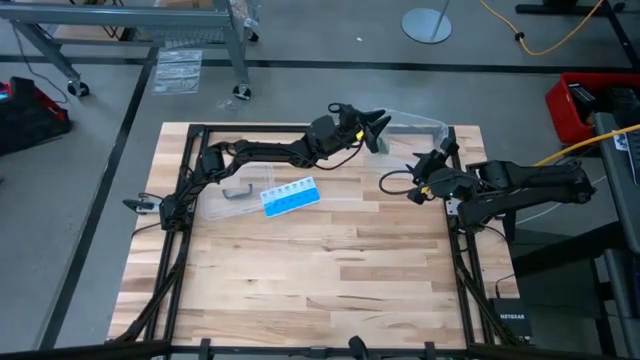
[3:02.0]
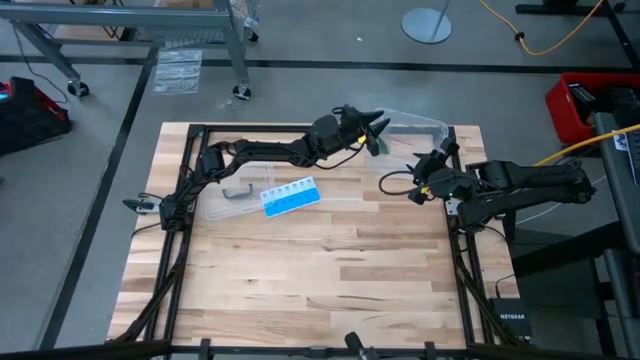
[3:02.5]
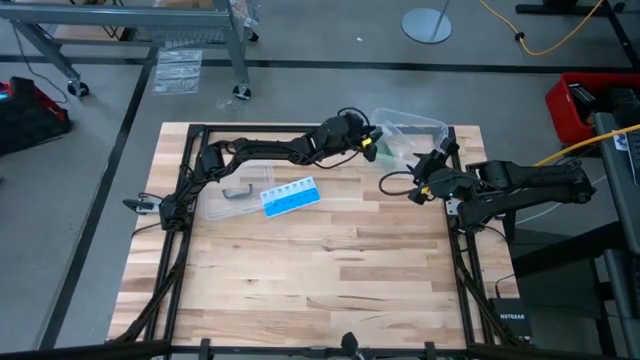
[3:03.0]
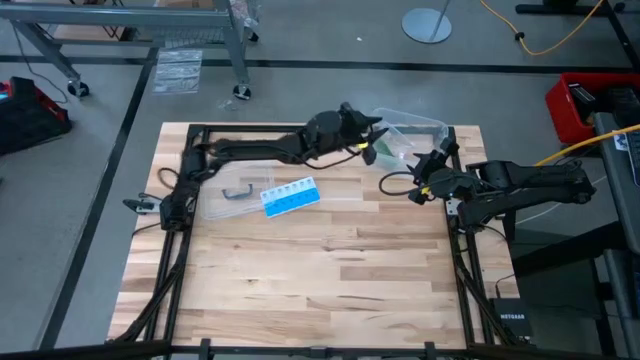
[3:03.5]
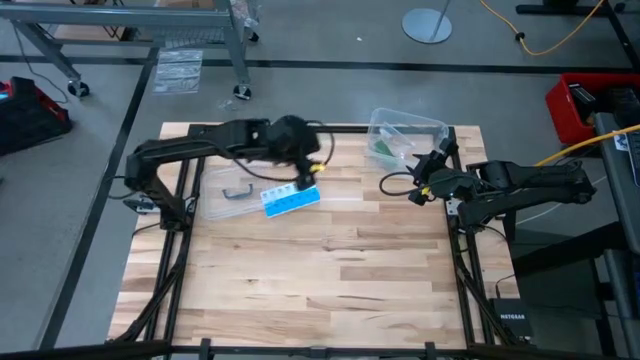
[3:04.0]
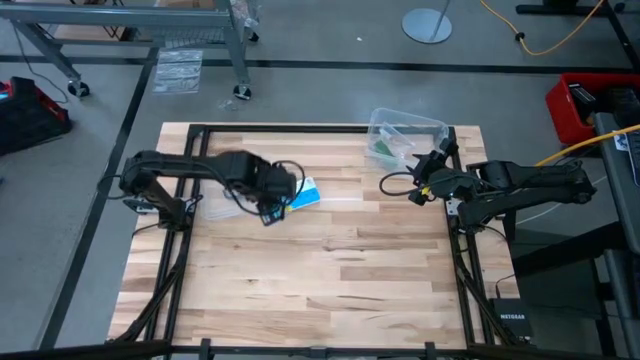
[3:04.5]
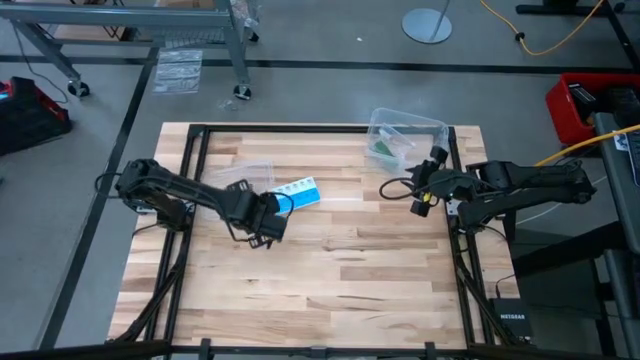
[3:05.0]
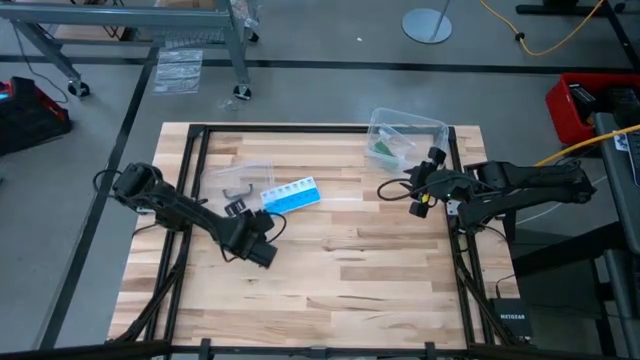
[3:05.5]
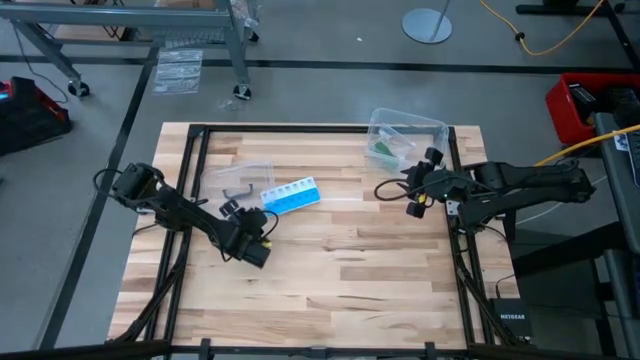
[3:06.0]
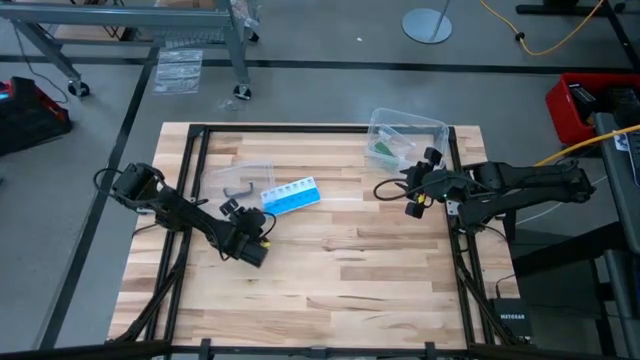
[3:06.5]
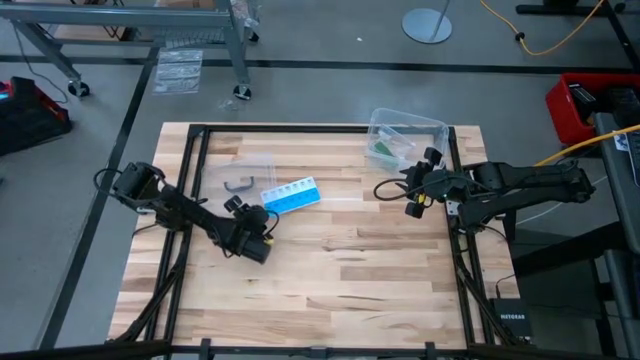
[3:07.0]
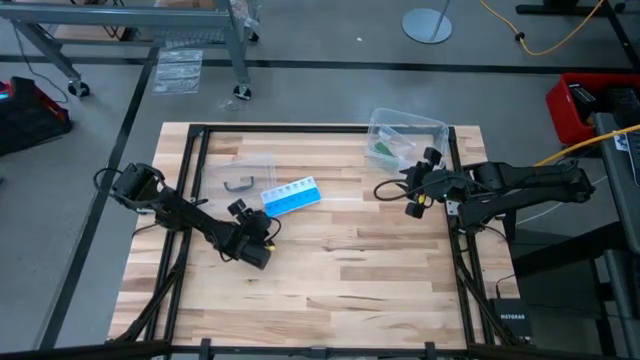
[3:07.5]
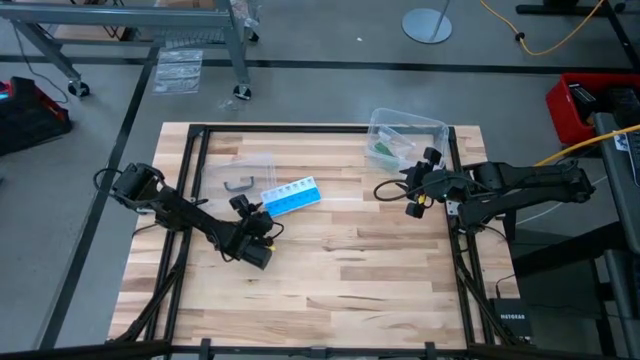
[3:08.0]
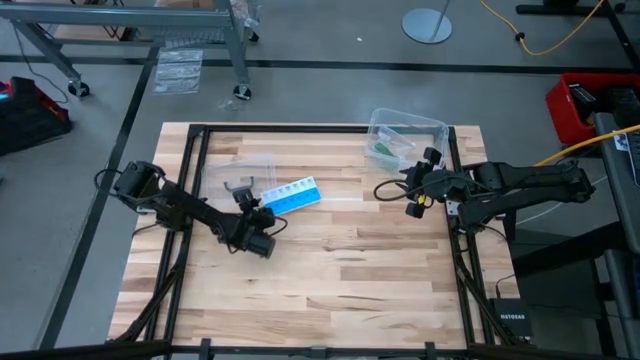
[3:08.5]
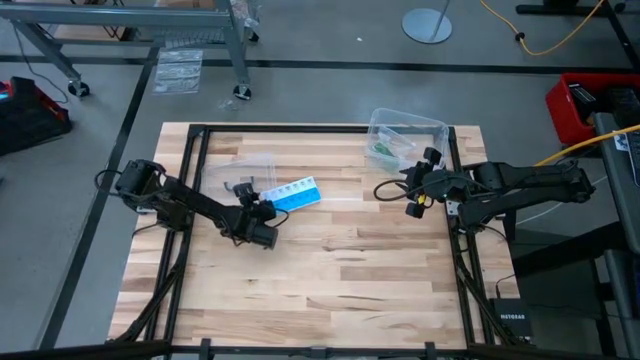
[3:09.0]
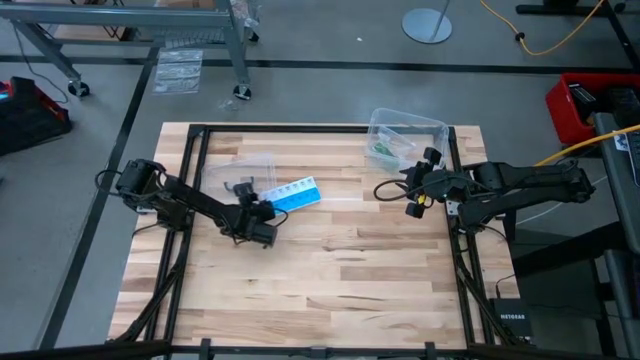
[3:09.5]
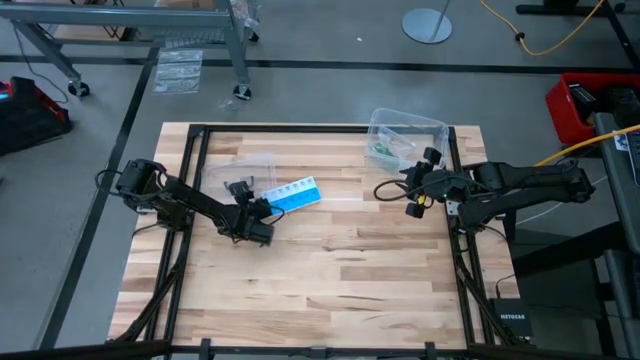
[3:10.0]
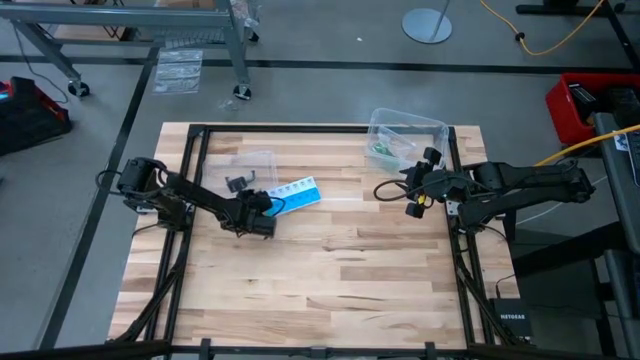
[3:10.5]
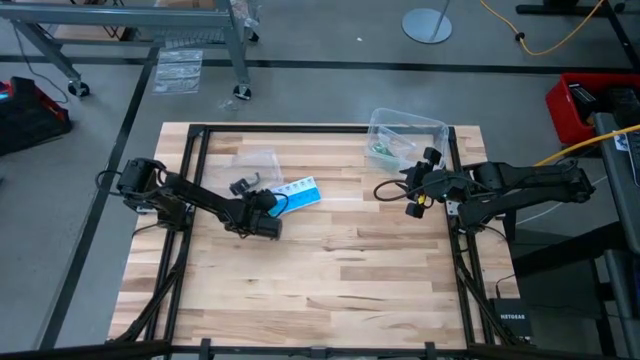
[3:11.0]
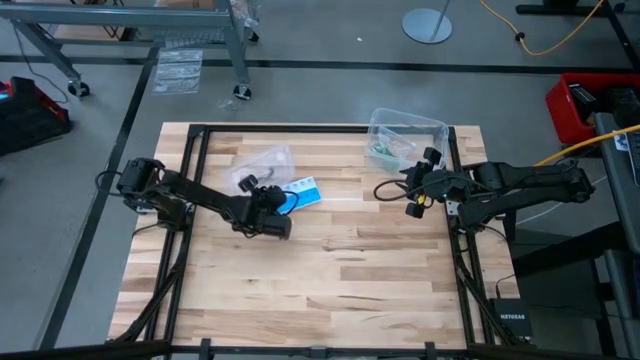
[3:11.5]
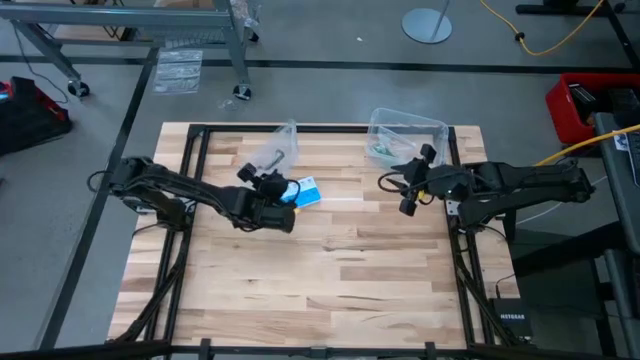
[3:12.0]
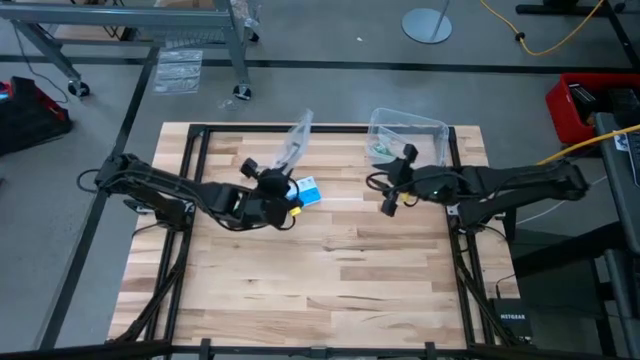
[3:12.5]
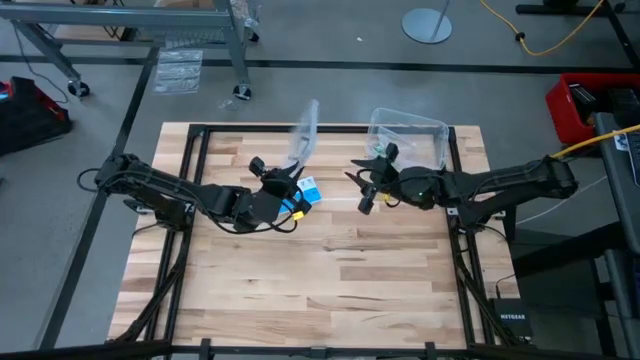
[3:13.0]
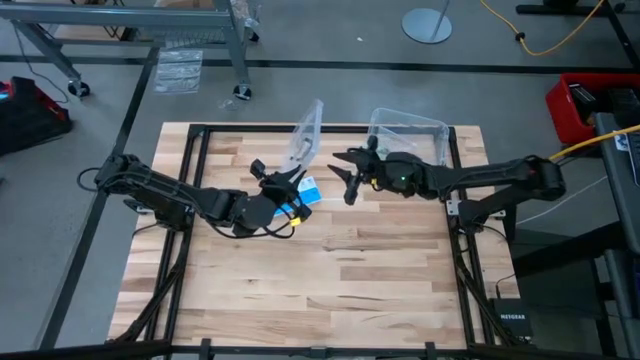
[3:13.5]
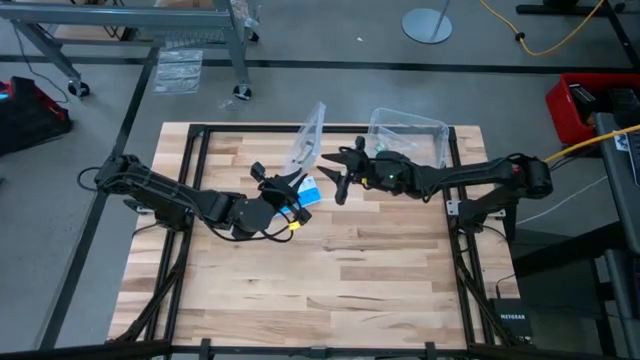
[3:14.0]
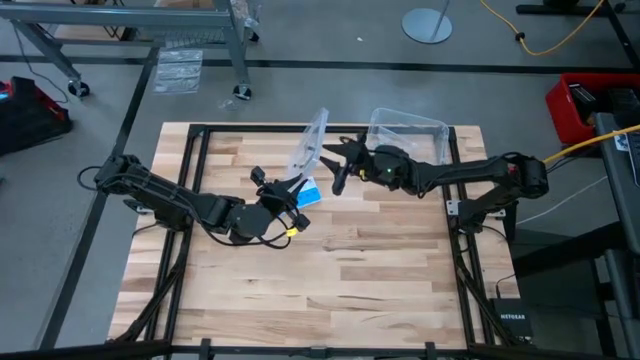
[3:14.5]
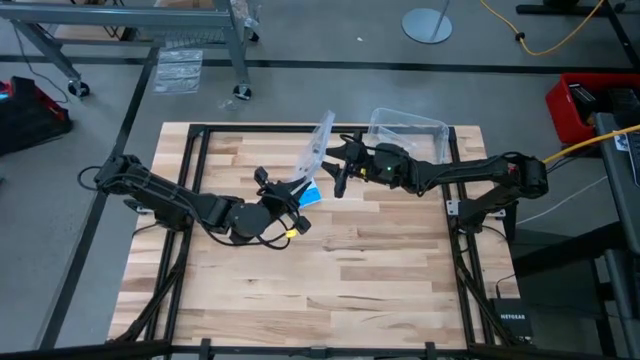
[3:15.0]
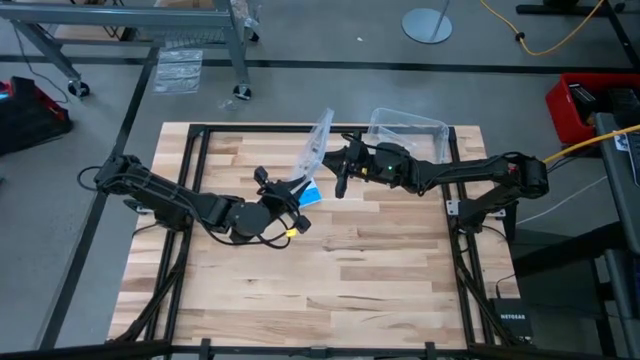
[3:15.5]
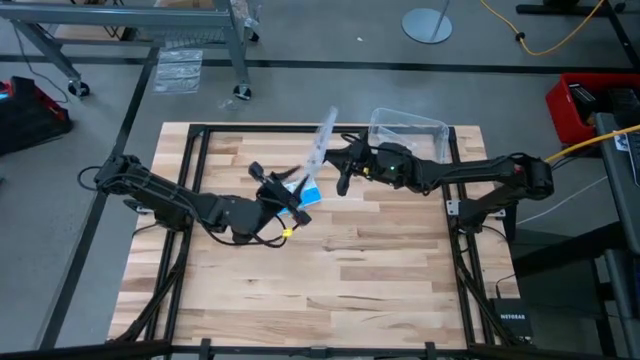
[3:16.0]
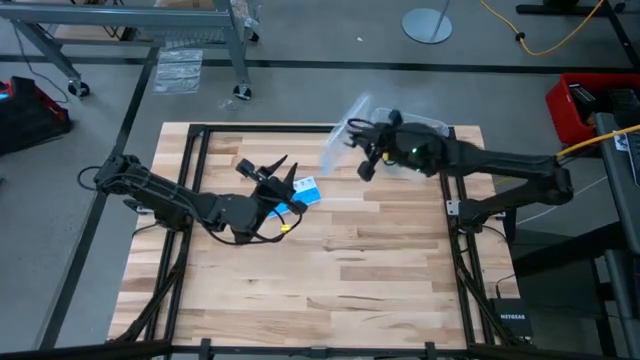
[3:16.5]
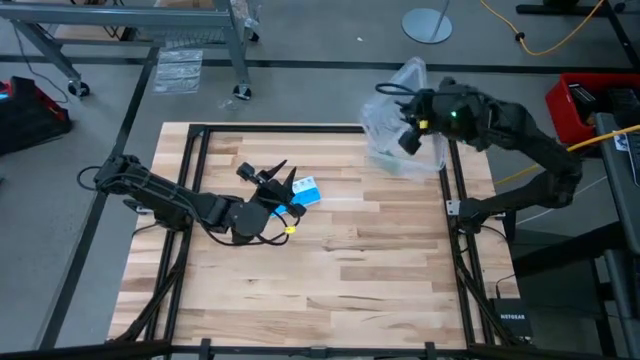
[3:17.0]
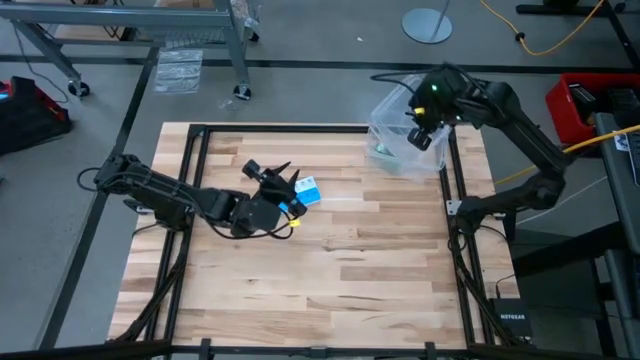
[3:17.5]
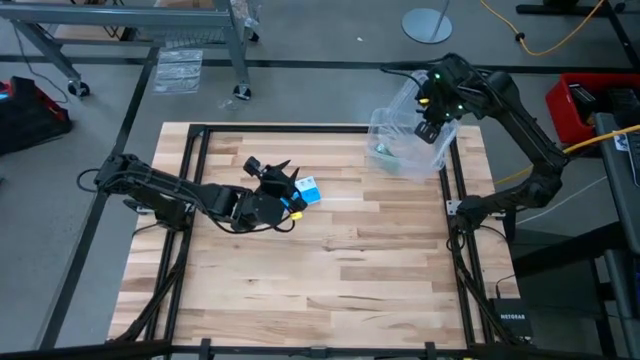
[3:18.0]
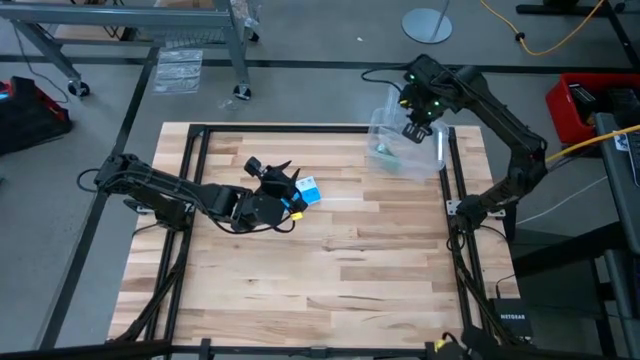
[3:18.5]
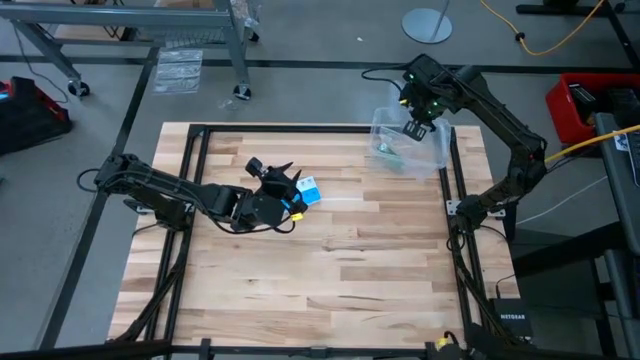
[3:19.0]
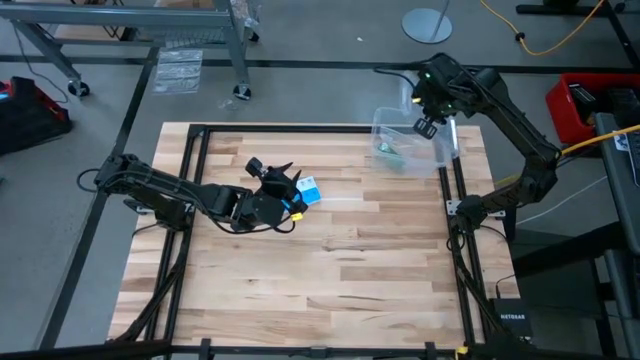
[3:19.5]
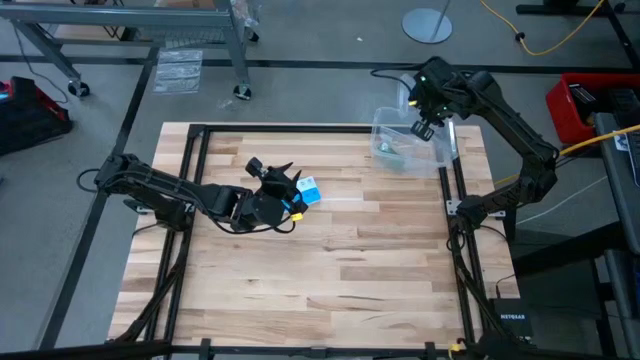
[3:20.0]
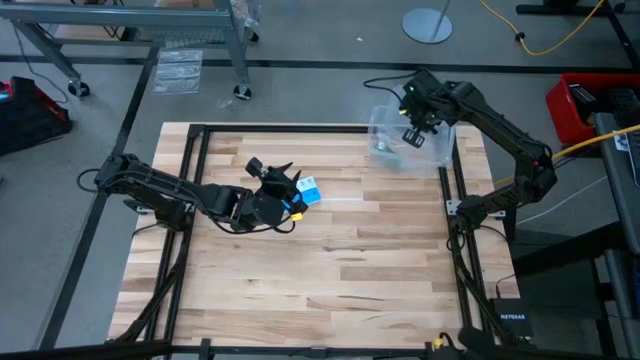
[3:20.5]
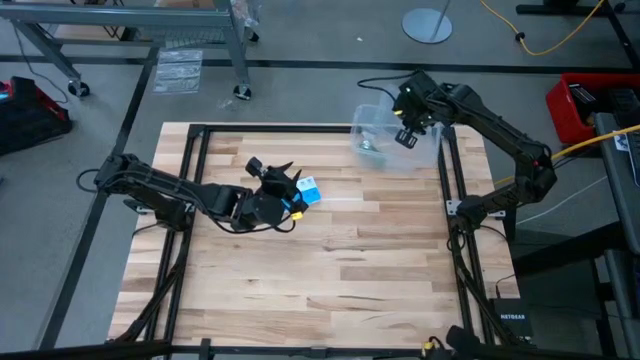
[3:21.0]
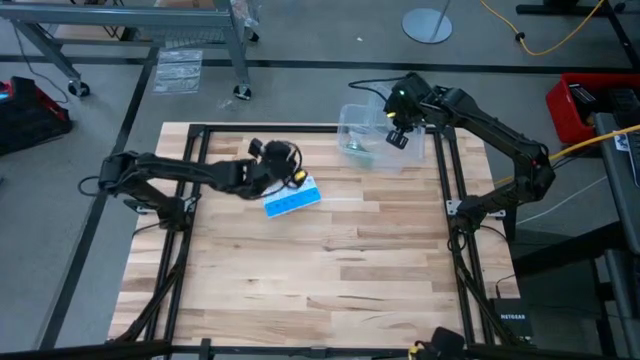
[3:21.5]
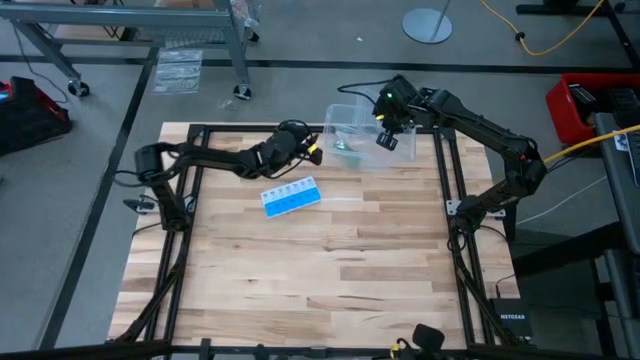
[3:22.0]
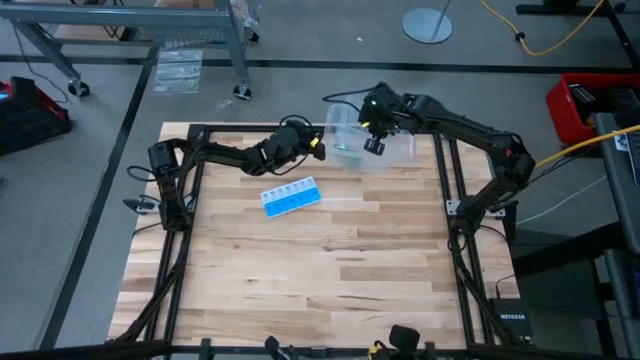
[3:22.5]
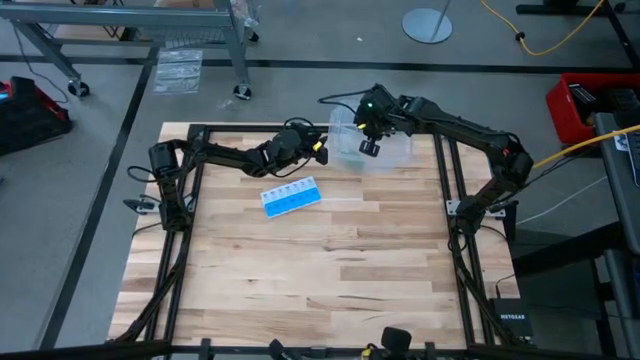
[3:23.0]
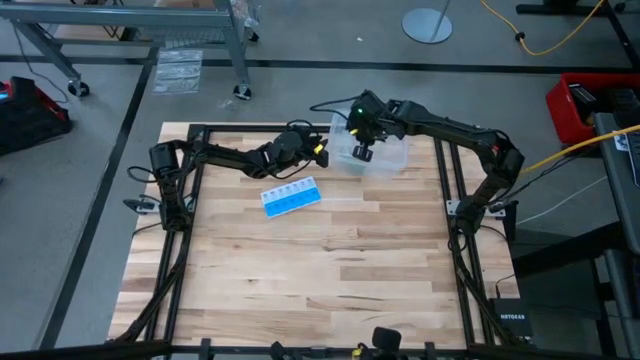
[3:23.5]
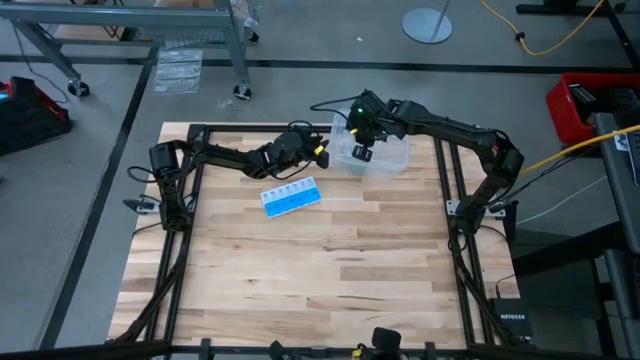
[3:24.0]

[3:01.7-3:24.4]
Task: Roll bandage
Close the transparent tupperware lid
